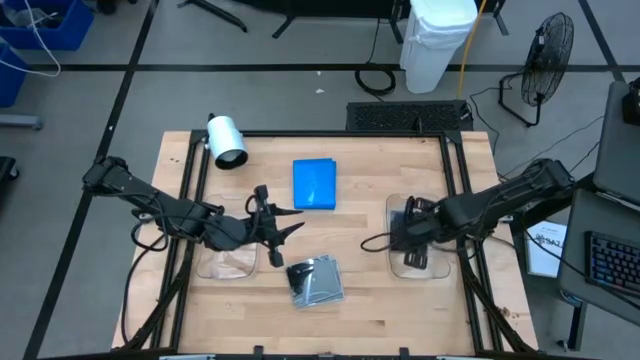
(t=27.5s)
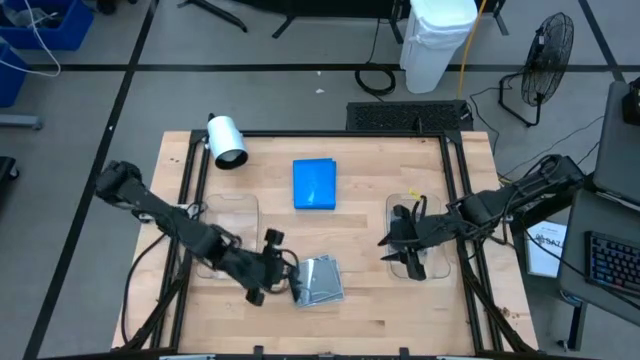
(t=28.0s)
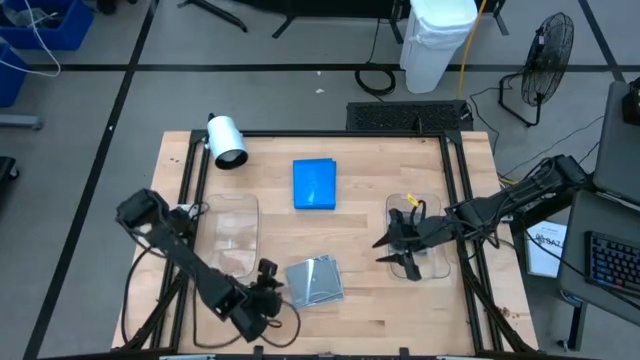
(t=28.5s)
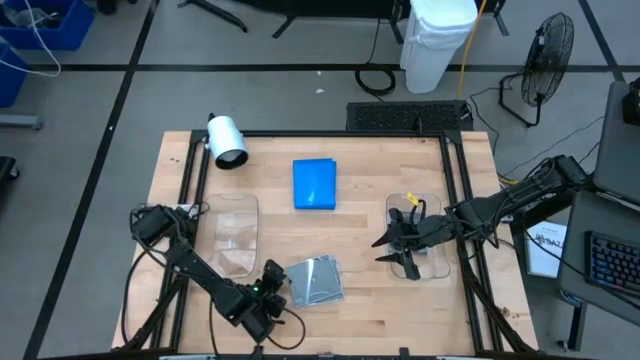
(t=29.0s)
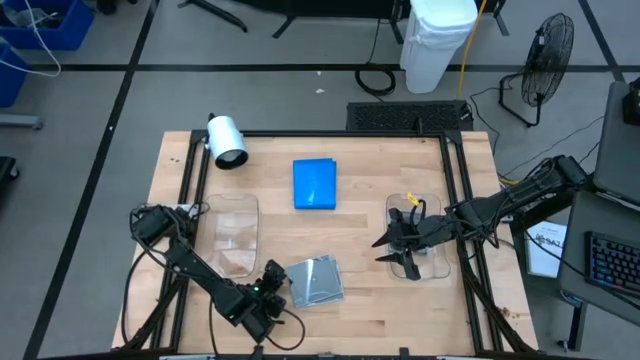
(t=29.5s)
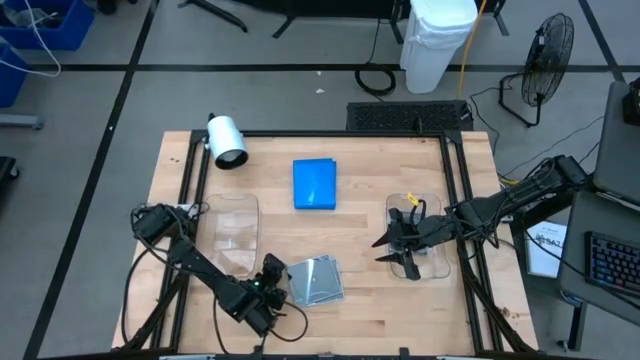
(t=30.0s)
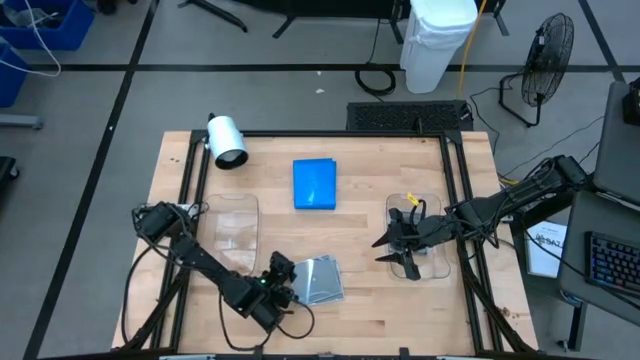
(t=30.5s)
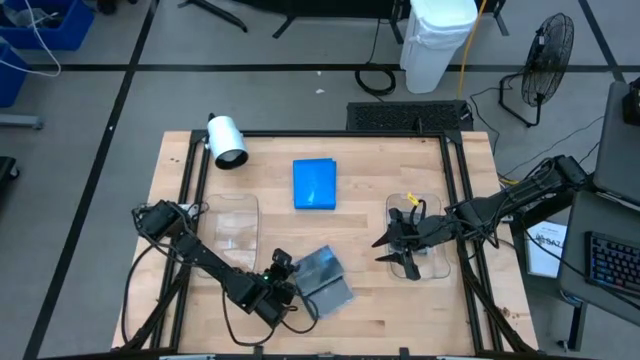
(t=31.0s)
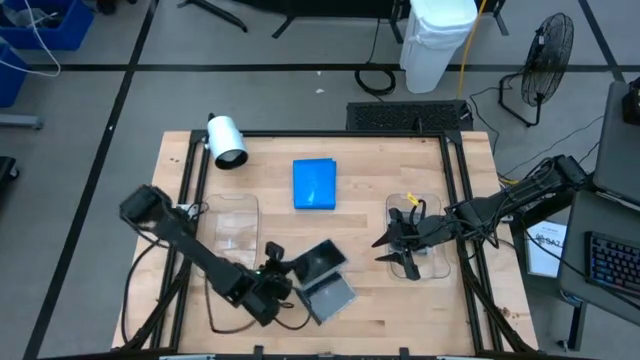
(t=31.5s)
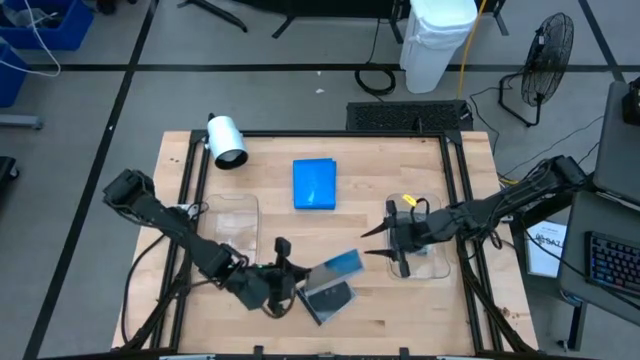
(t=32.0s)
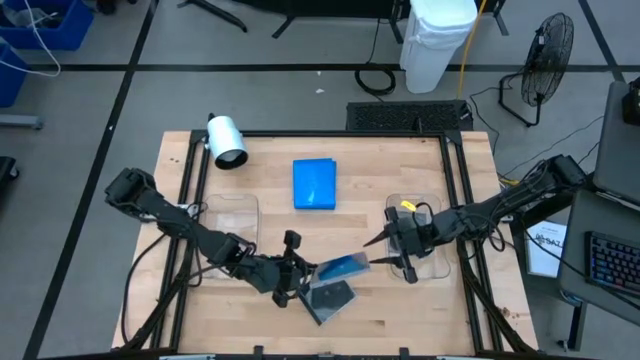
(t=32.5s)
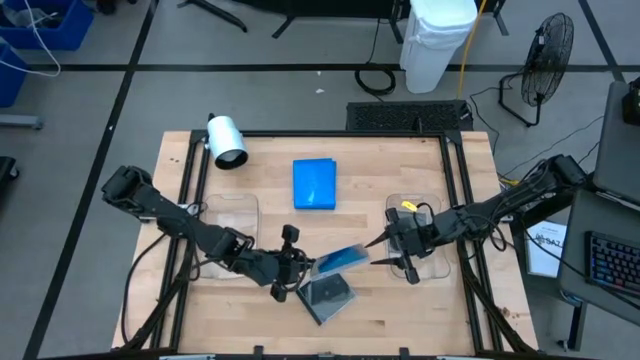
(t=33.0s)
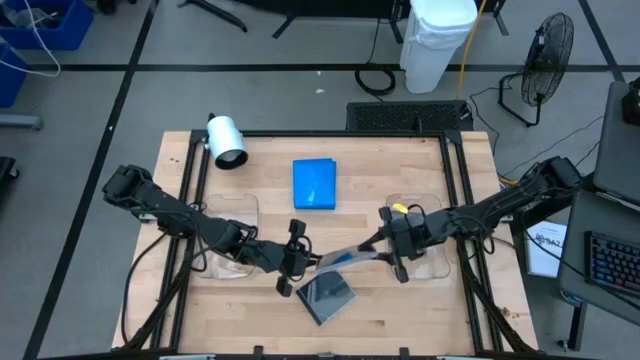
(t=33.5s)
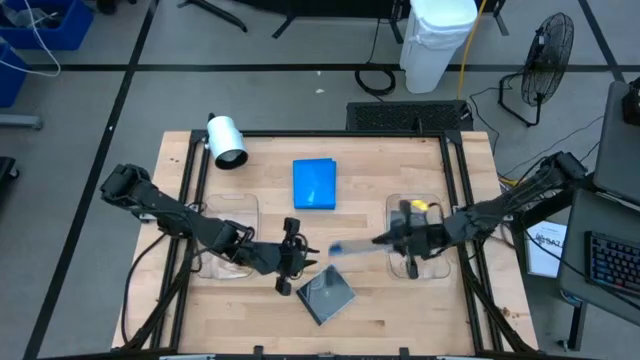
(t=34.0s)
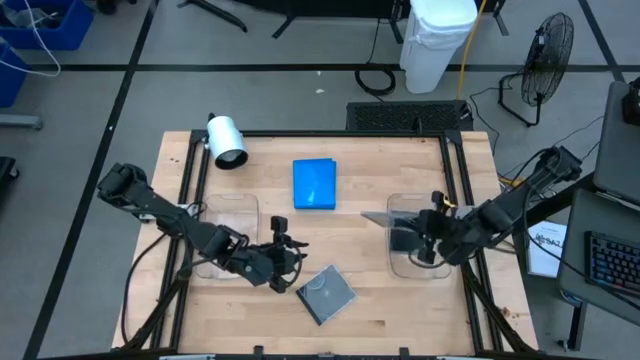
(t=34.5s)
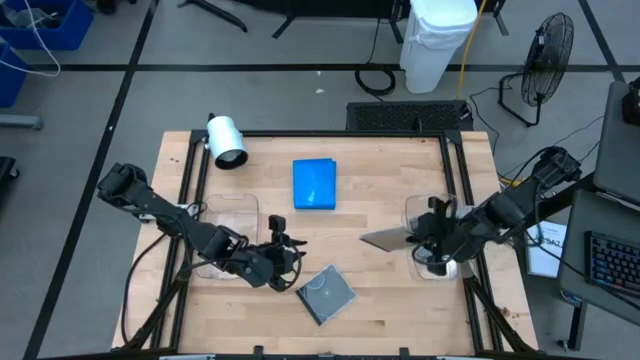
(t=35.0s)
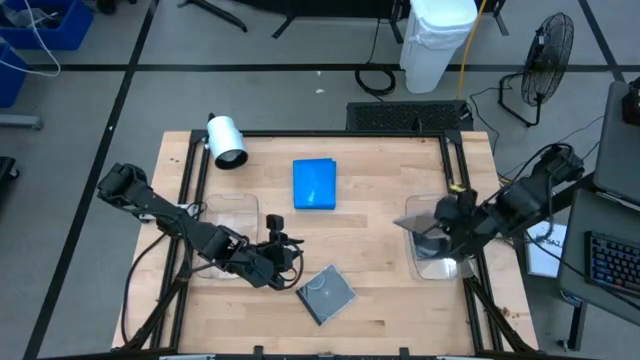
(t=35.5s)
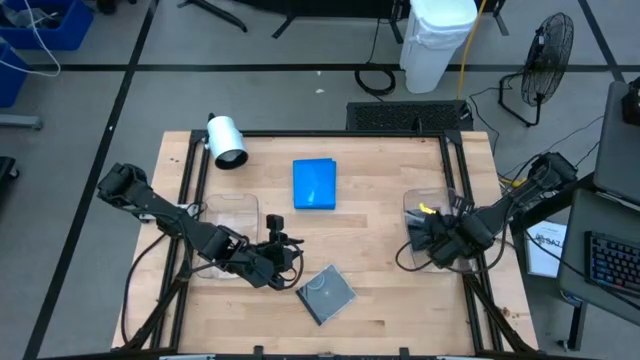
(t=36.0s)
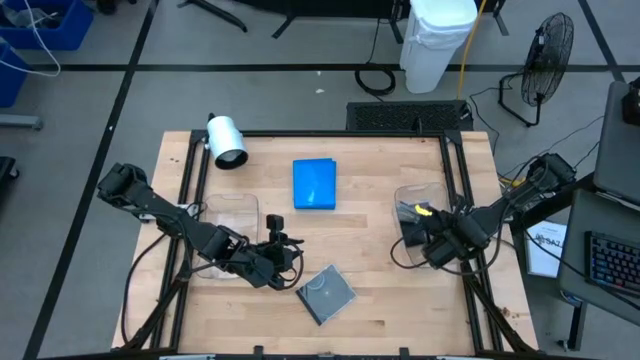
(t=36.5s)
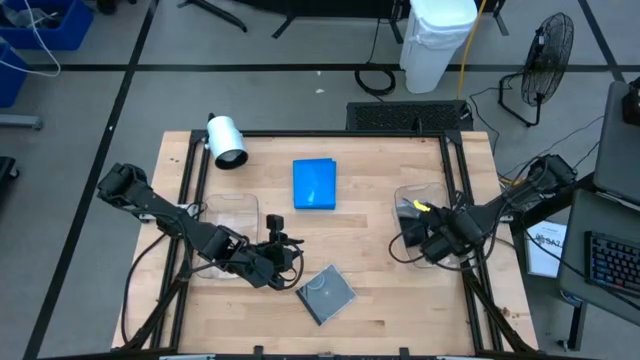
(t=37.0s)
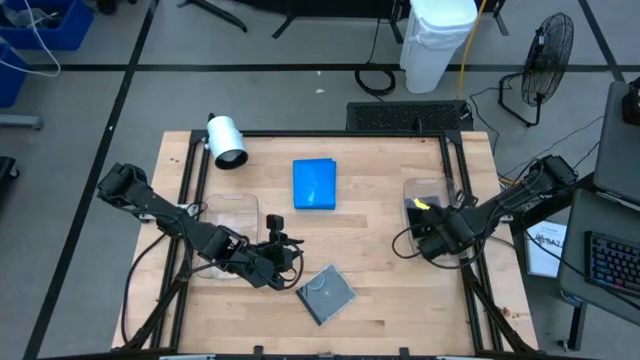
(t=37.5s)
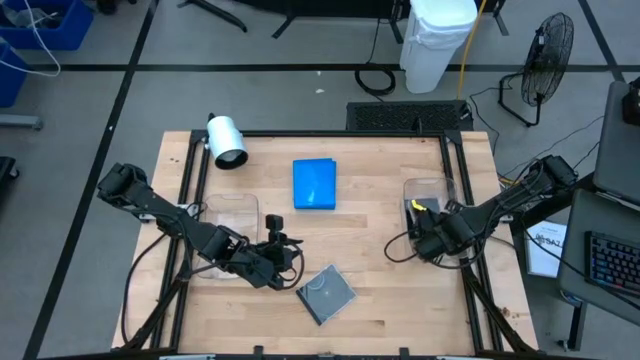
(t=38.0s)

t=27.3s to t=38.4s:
Task: Pick & place jewel cases by type
Put the black CD case into the right transparent bin

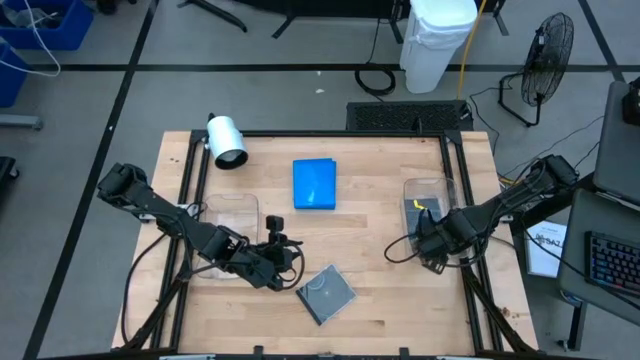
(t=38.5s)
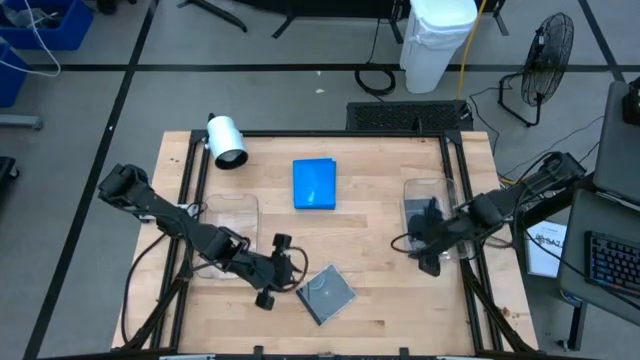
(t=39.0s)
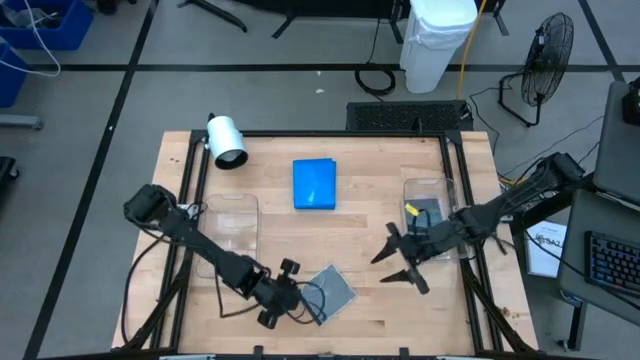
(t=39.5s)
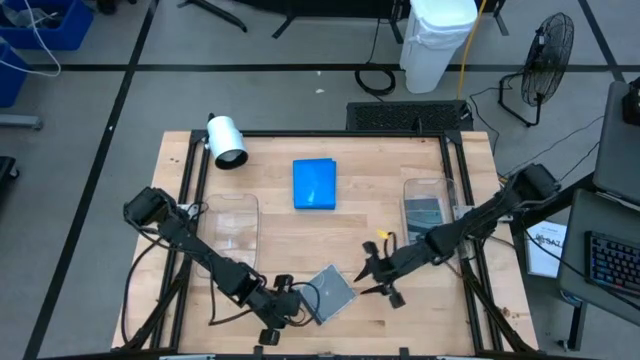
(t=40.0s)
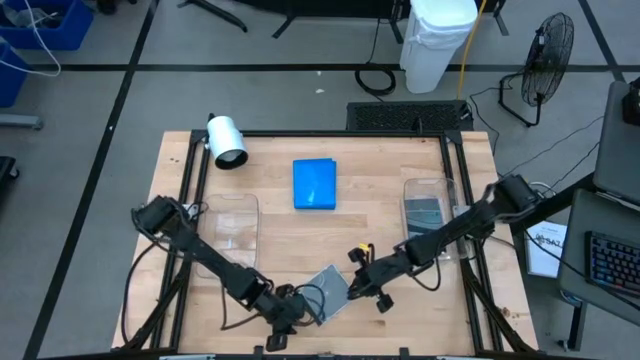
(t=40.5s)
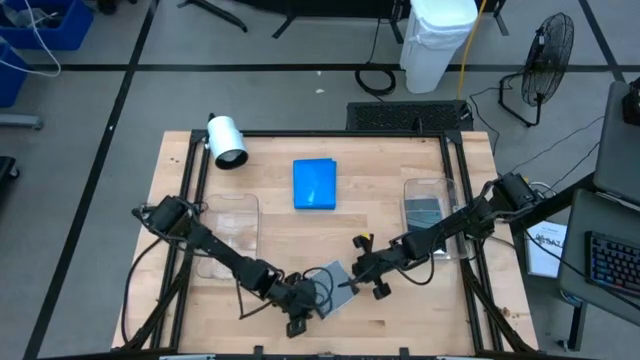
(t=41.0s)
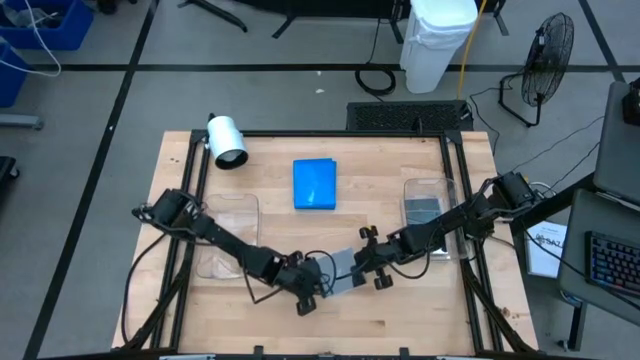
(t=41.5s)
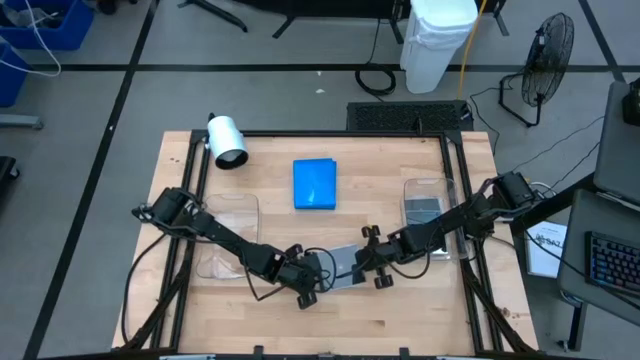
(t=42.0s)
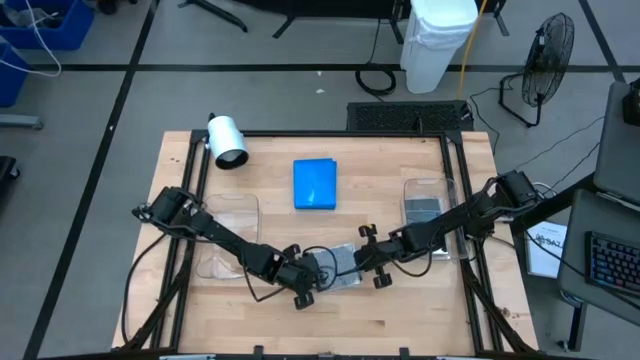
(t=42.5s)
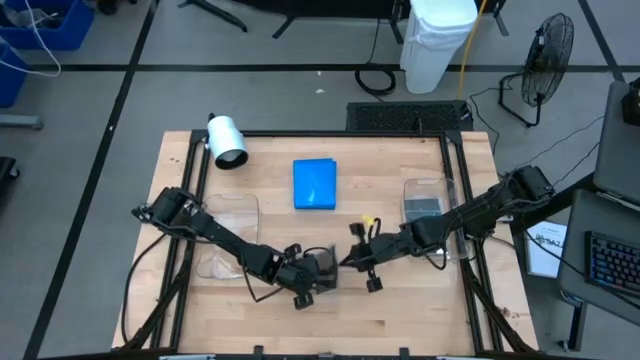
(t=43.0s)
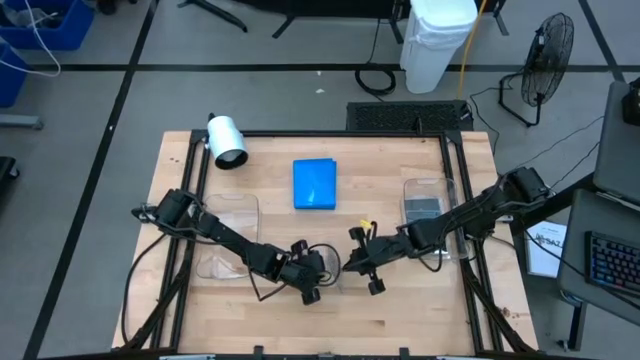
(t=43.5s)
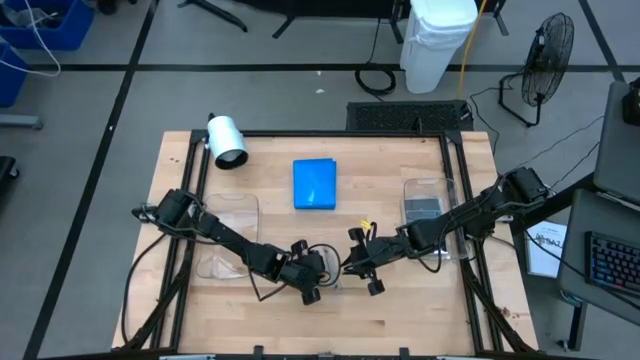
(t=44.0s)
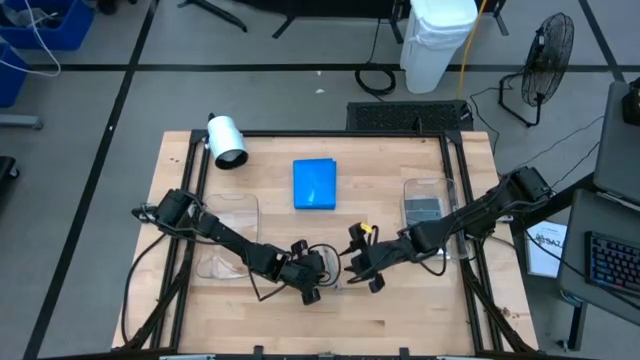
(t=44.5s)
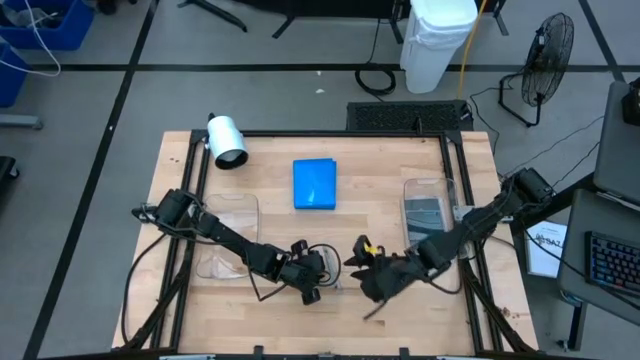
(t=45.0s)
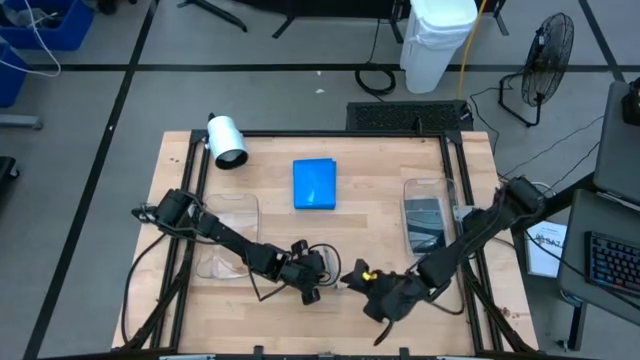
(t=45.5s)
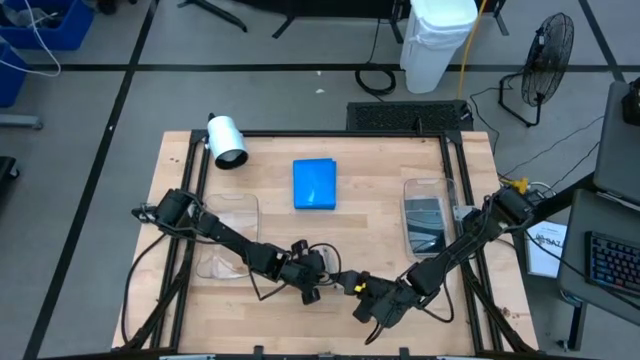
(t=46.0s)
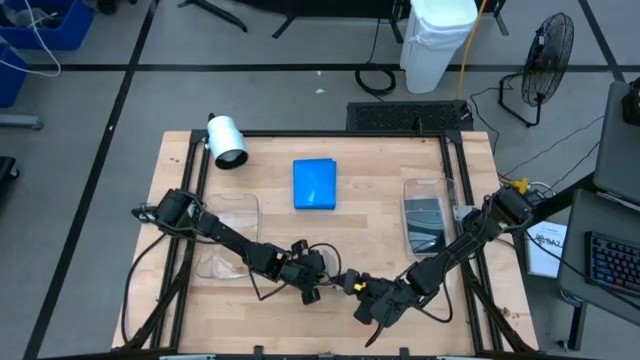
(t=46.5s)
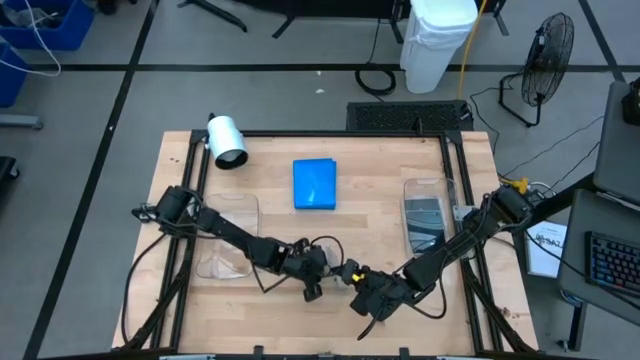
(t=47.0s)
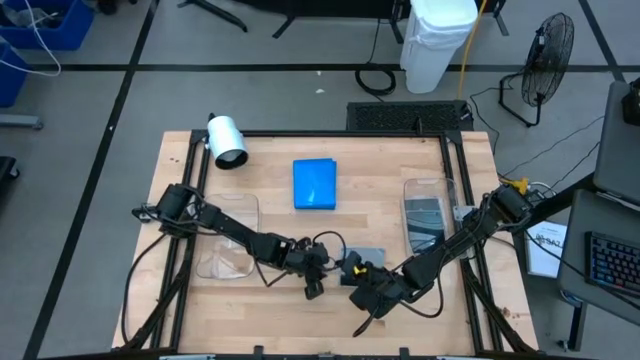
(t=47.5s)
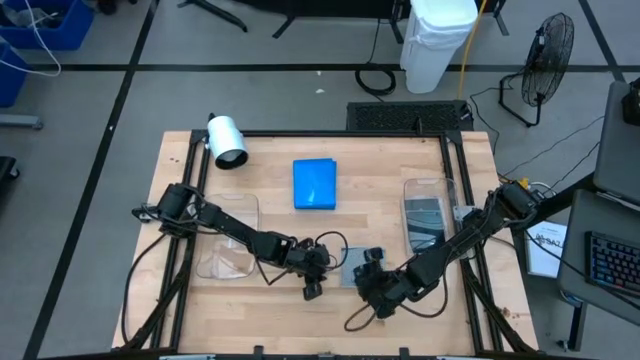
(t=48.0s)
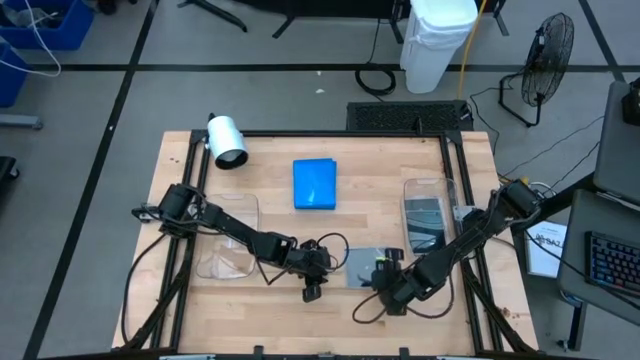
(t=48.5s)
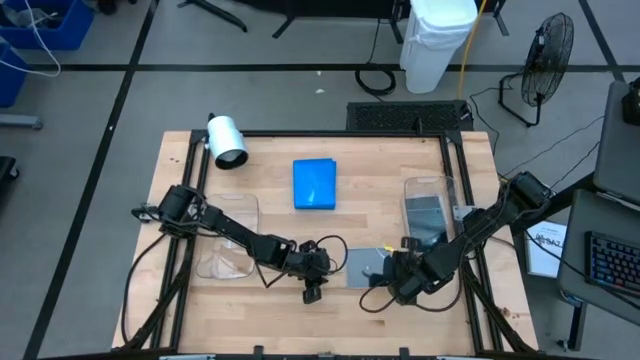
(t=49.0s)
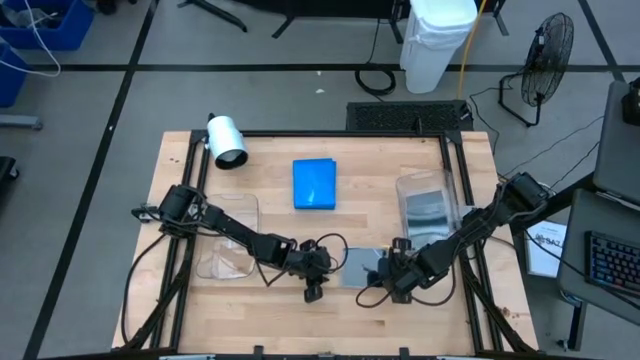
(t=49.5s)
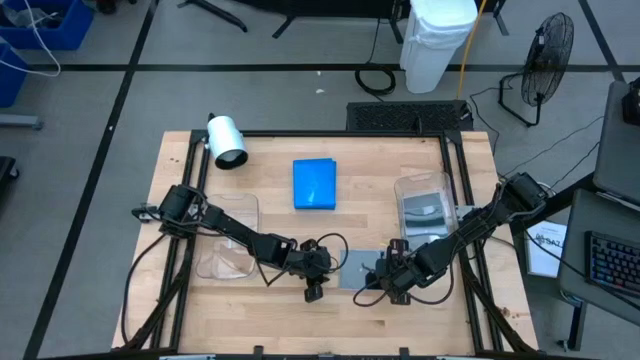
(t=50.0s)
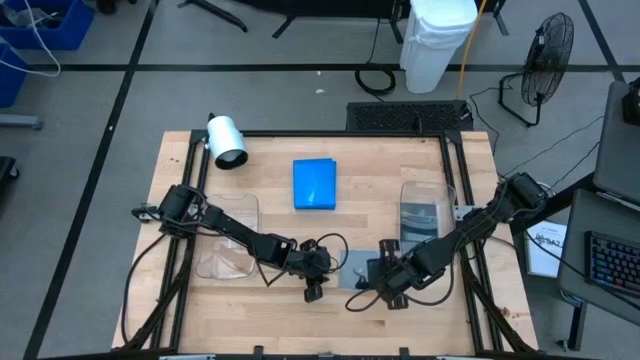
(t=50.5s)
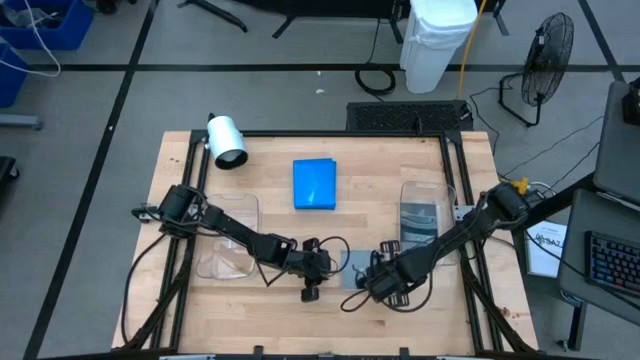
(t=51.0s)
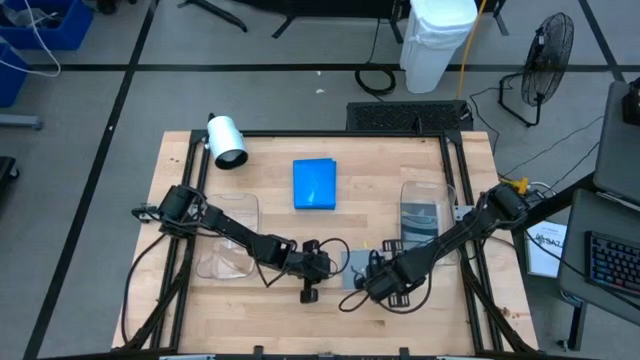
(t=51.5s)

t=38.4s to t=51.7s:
Put the black CD case into the right transparent bin
